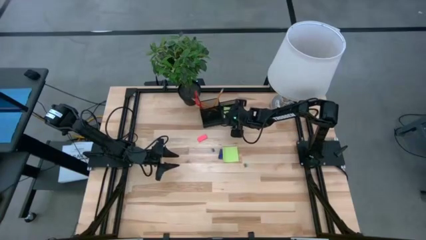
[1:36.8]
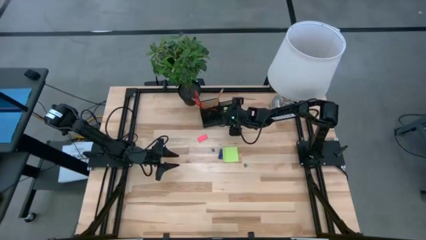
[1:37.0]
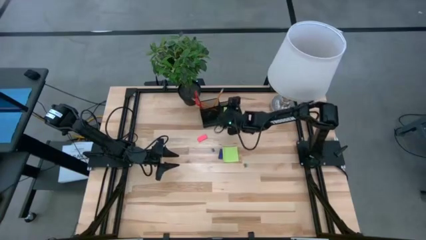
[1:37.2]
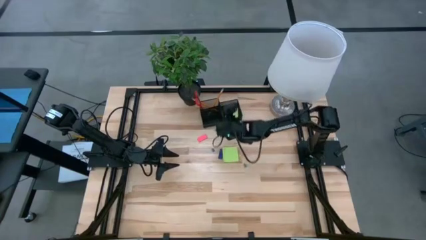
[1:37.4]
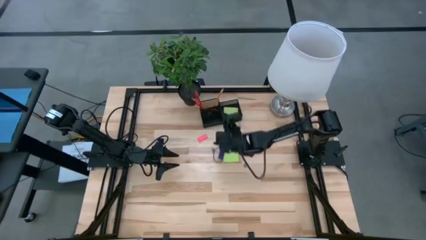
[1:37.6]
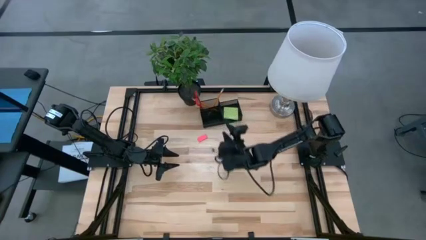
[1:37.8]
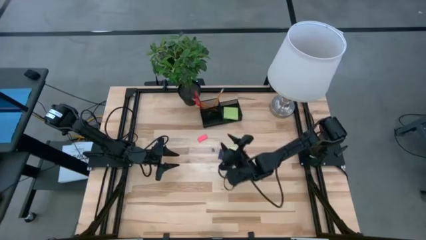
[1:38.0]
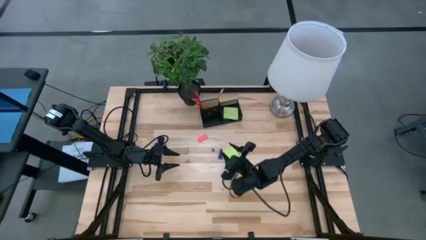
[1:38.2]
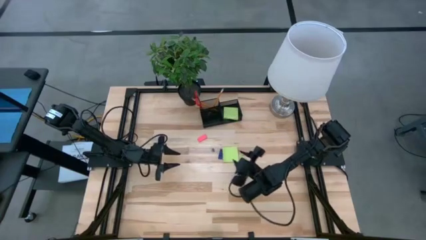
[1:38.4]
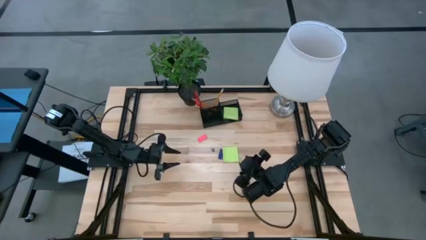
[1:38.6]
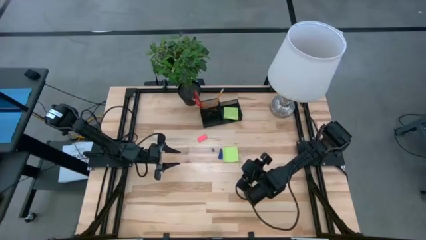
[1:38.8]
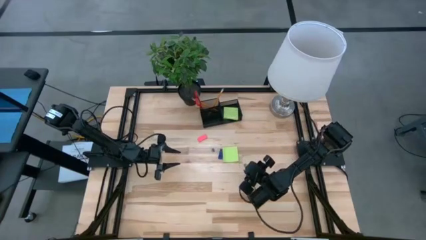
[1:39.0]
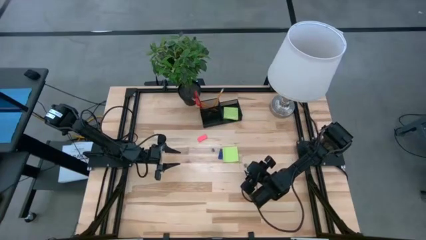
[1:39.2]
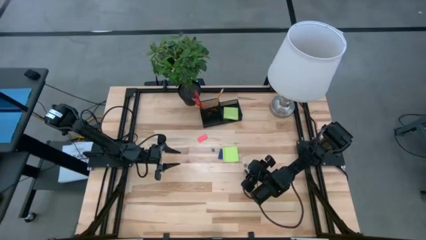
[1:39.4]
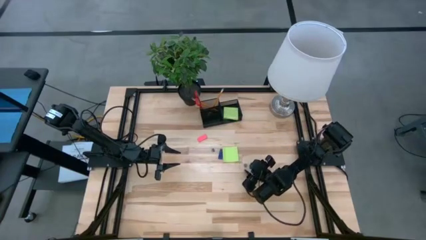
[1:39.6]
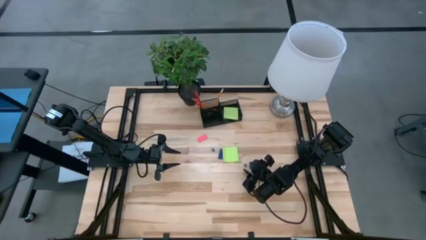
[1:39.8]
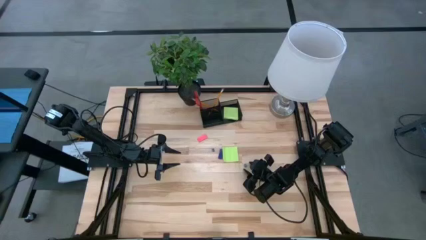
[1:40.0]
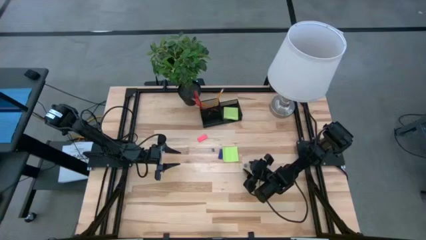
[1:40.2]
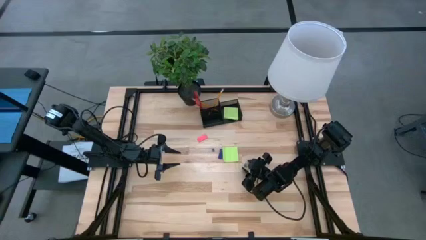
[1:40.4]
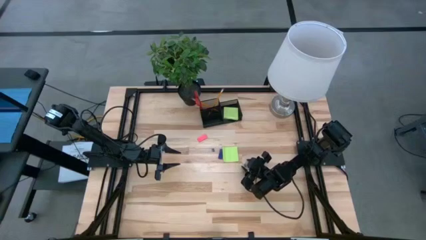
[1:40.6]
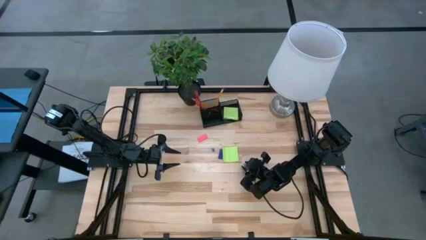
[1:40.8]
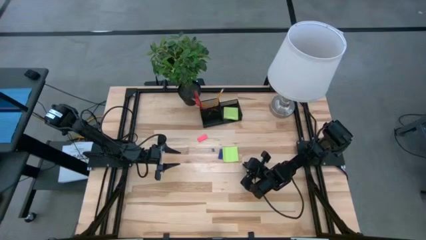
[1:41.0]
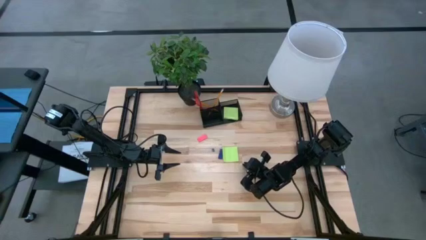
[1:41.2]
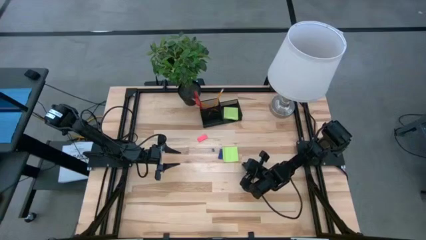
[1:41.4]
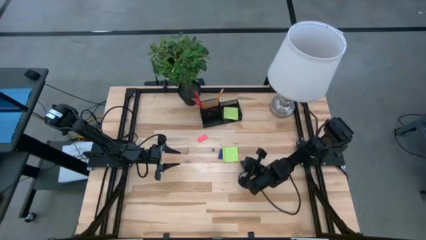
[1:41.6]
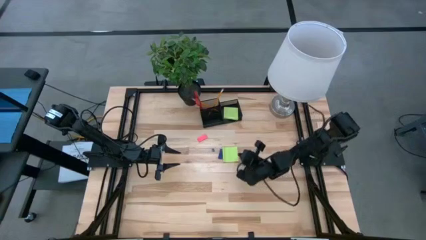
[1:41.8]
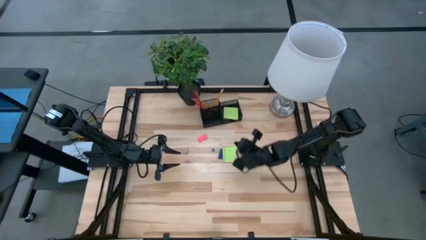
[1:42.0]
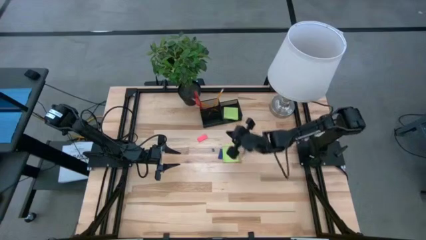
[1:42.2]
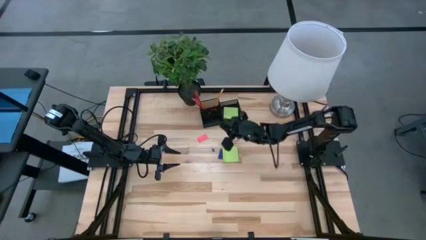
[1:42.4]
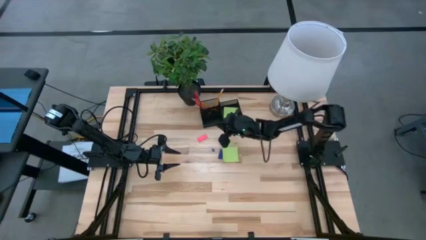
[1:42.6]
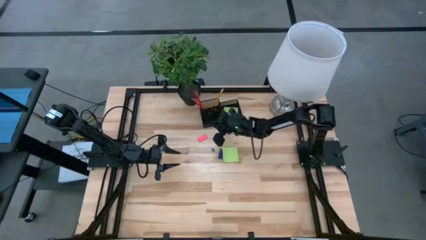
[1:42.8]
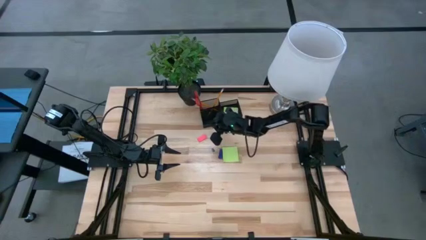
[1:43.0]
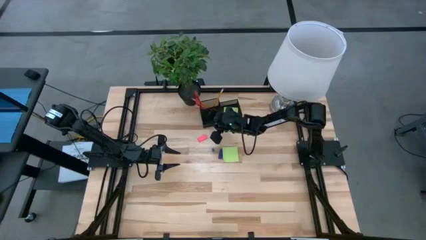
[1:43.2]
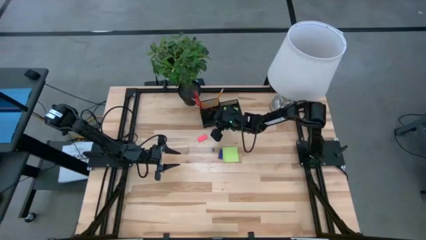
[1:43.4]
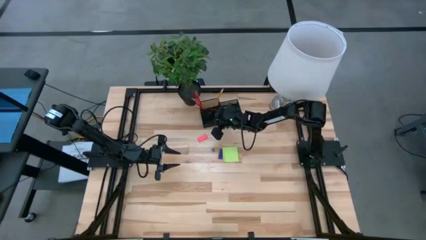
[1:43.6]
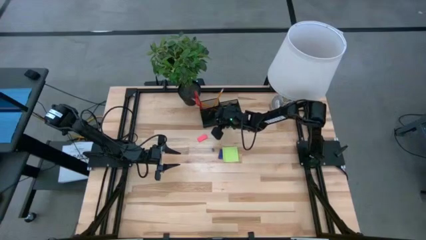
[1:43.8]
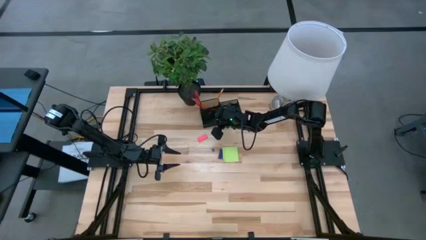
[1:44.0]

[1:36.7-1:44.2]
Task: Pick and place office supplies into organizer
Put the bottom blue binder clip into the desk organizer

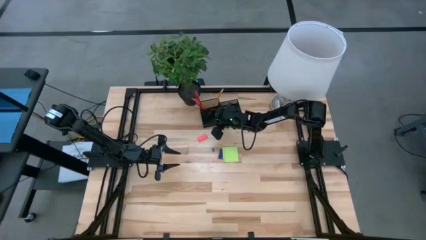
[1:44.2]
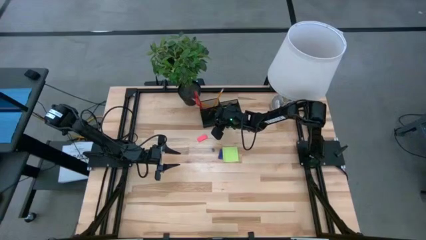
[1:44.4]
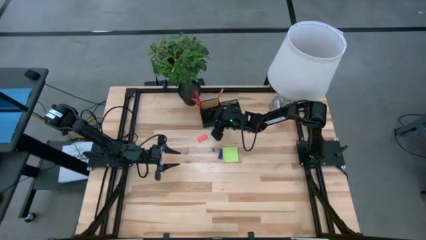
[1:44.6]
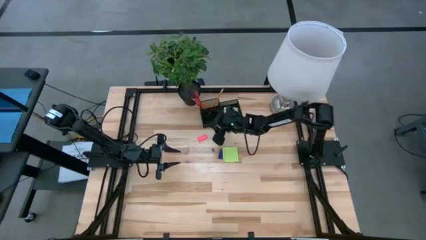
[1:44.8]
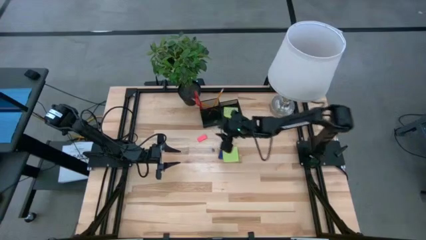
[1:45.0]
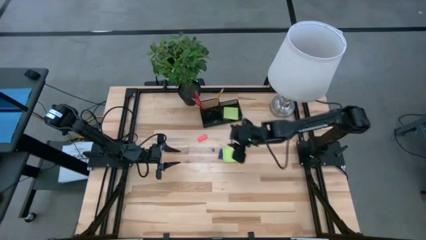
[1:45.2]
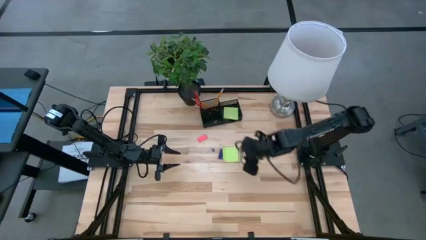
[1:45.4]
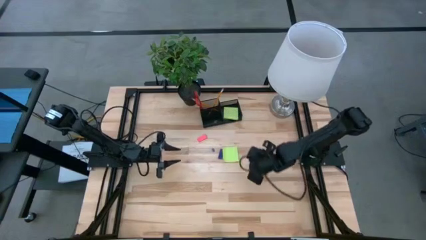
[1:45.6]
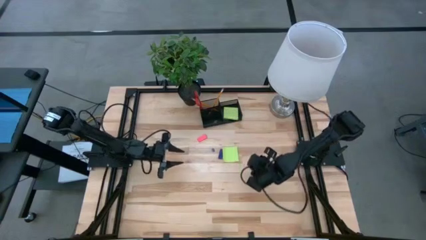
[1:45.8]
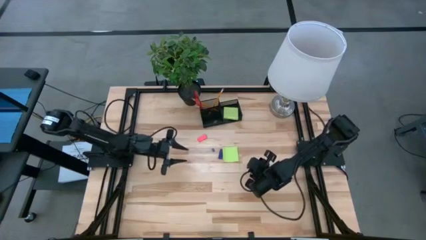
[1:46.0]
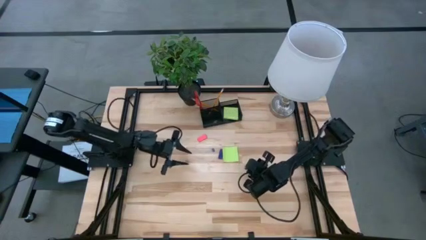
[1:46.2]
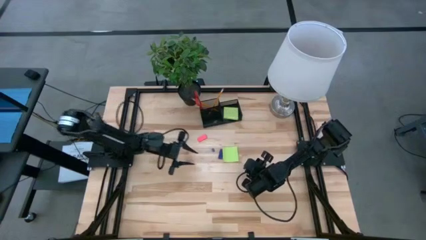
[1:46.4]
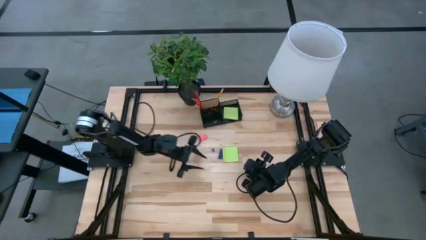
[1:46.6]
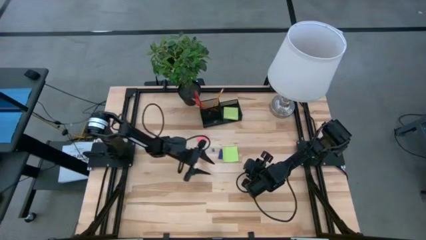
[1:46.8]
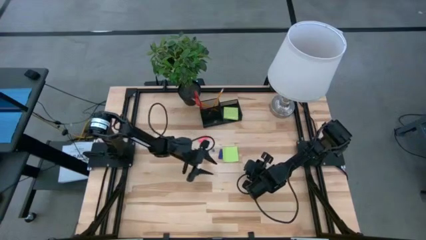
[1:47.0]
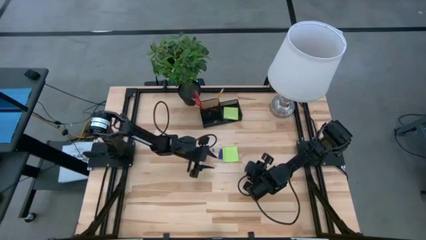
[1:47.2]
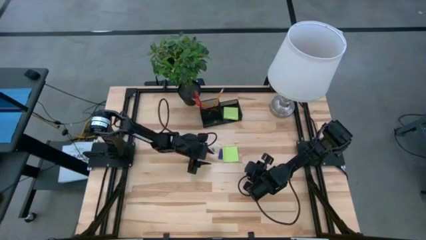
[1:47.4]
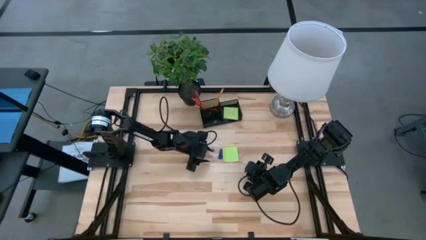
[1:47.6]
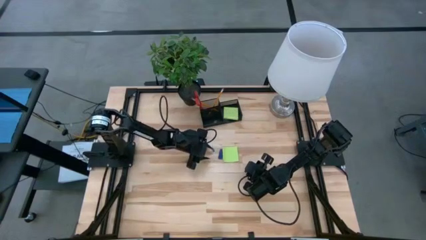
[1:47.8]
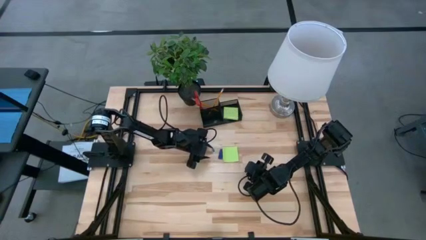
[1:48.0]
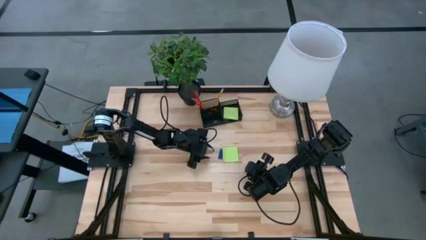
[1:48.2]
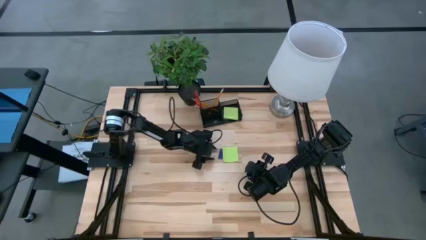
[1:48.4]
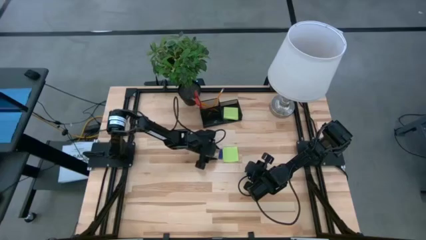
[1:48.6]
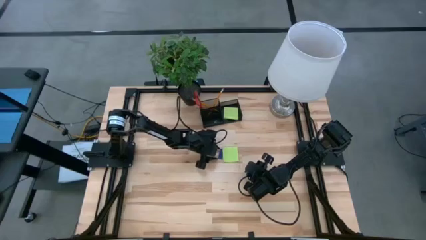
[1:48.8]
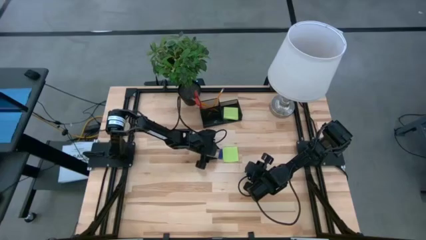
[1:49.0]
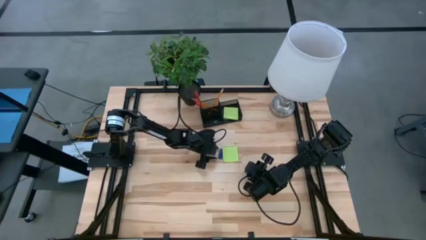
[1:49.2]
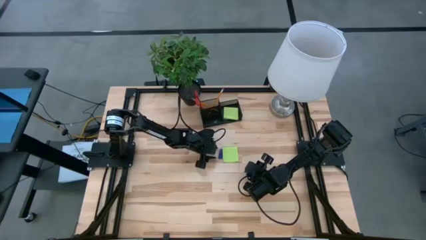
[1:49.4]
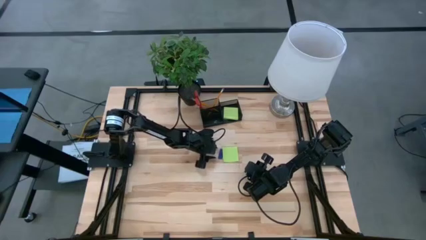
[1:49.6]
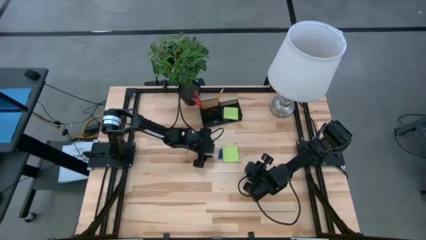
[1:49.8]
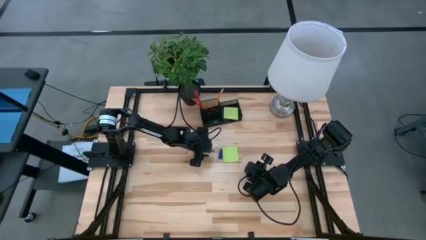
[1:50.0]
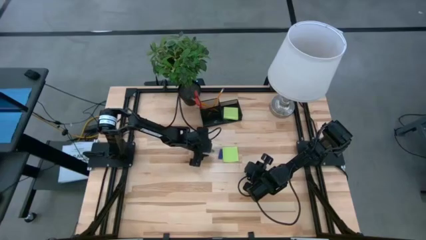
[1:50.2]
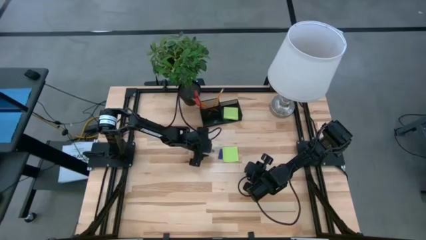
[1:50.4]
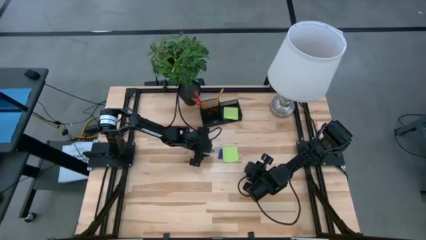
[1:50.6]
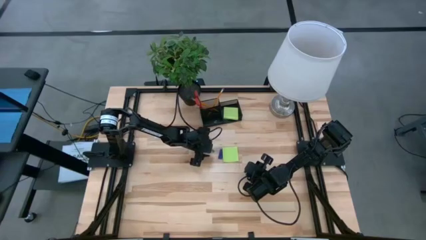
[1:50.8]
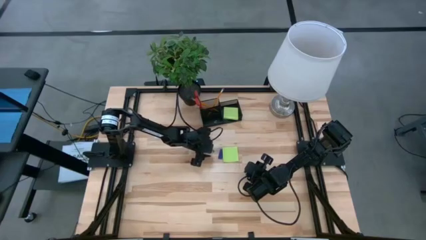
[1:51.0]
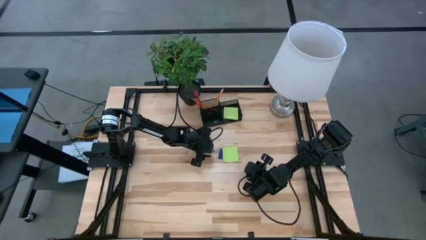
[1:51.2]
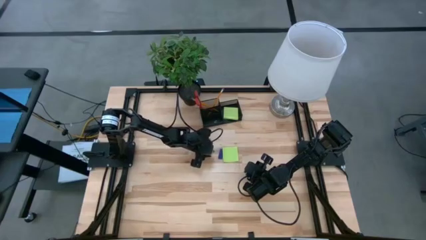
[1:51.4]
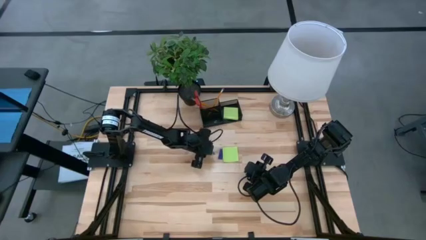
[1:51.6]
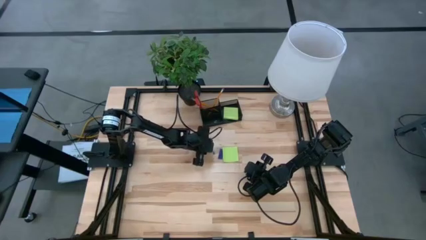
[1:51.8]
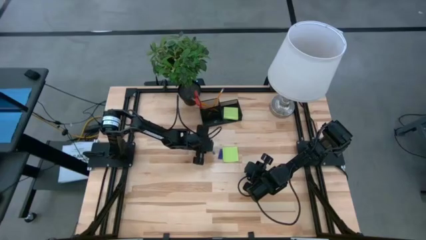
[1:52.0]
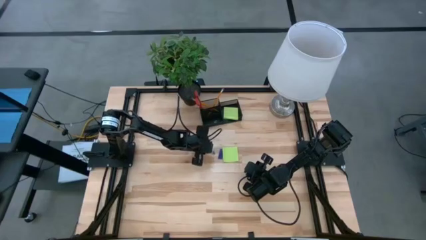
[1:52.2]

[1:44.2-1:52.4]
Put the blue binder clip into the desk organizer
